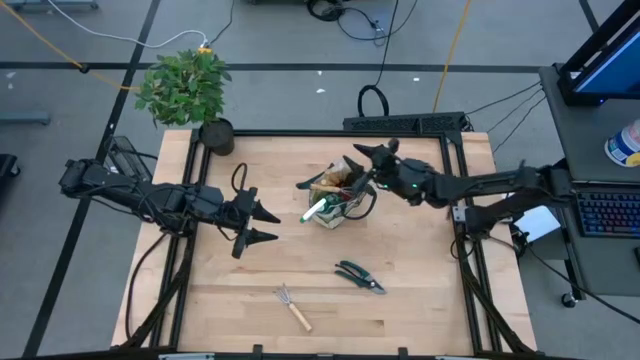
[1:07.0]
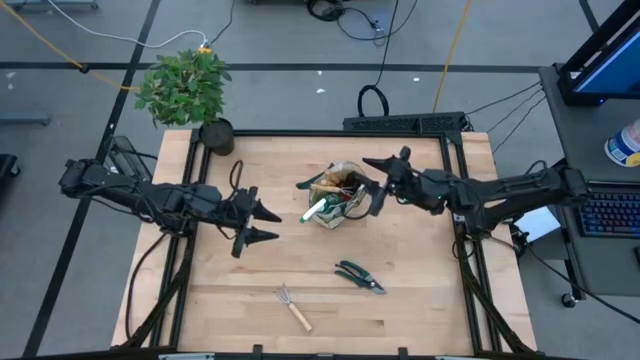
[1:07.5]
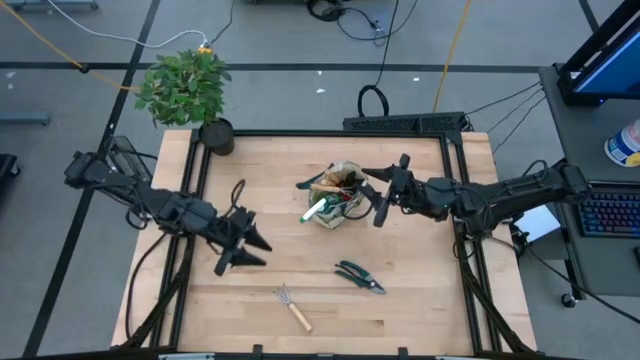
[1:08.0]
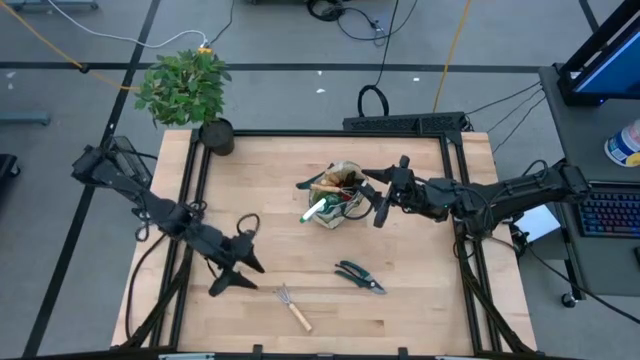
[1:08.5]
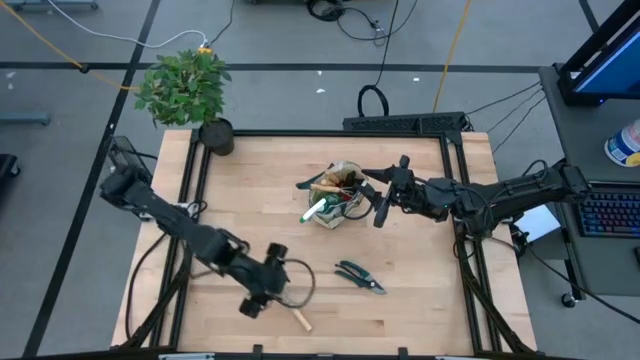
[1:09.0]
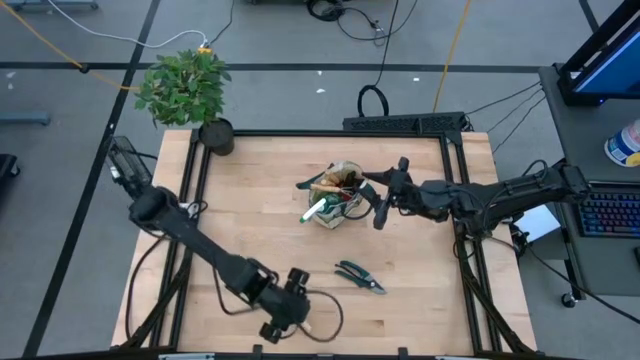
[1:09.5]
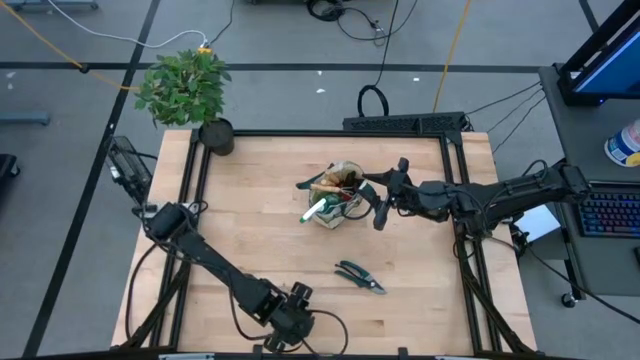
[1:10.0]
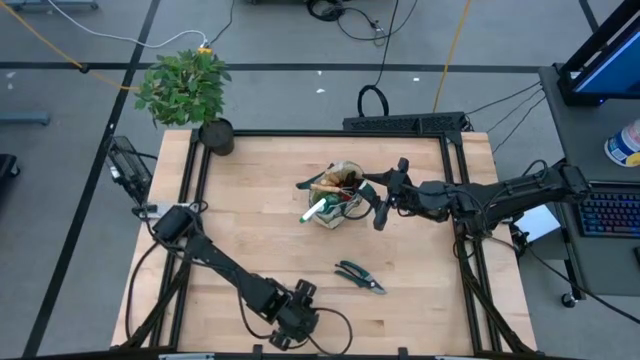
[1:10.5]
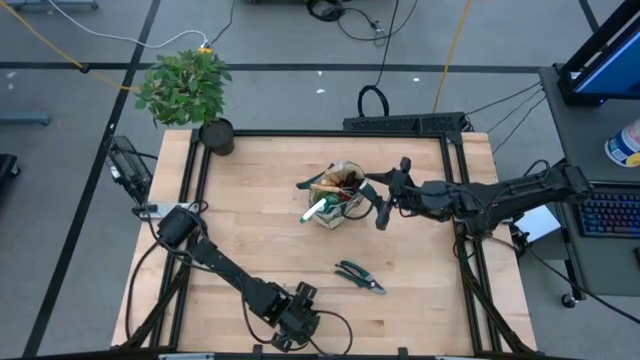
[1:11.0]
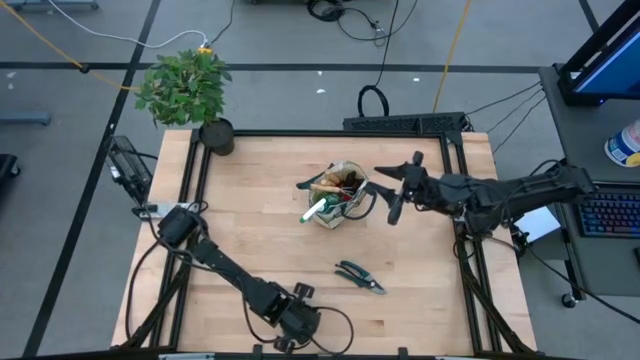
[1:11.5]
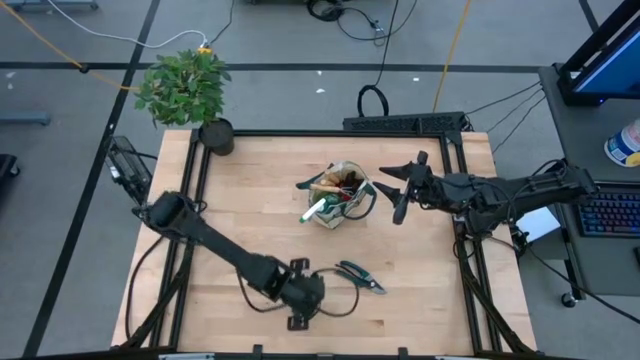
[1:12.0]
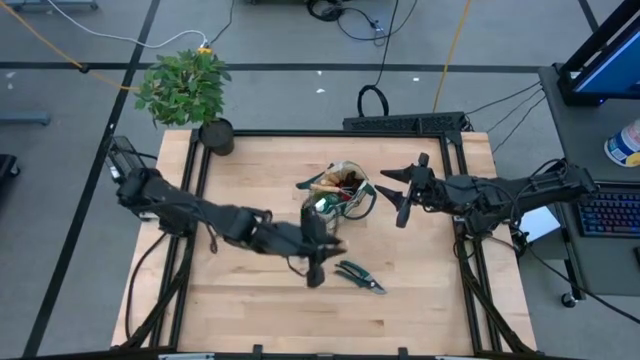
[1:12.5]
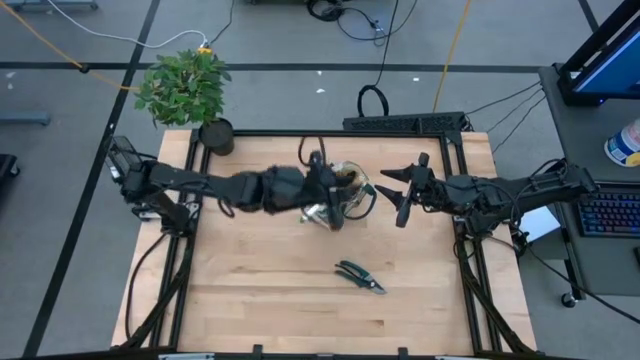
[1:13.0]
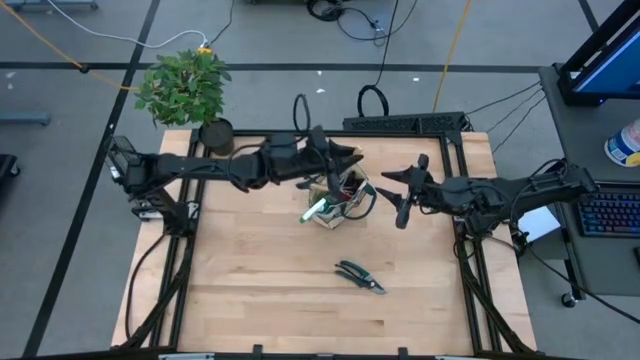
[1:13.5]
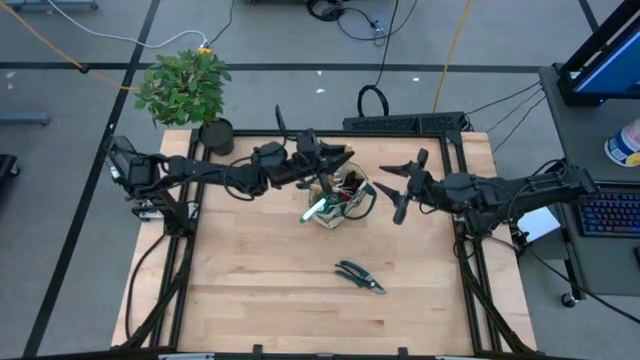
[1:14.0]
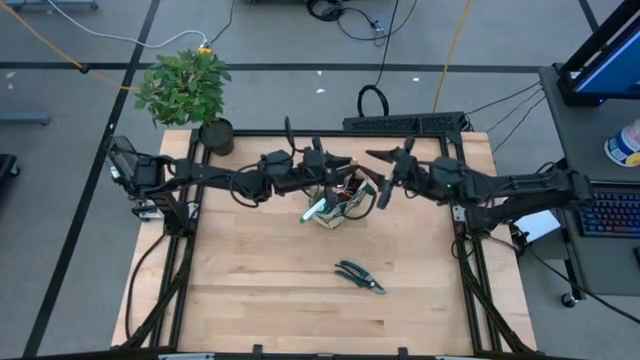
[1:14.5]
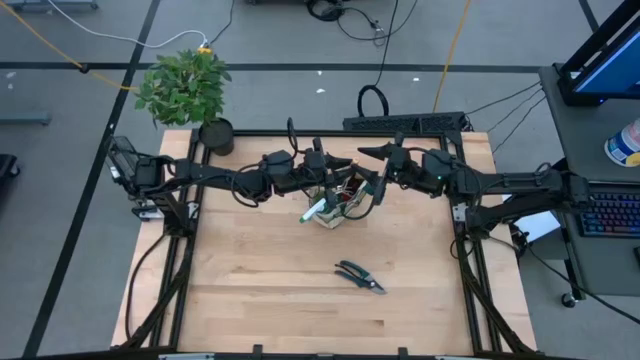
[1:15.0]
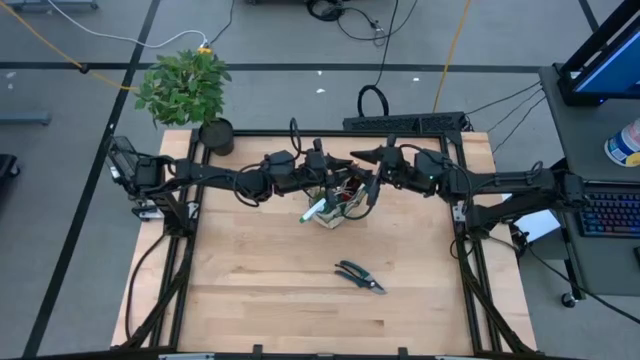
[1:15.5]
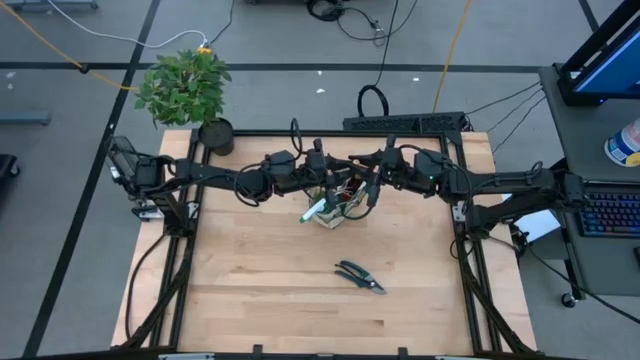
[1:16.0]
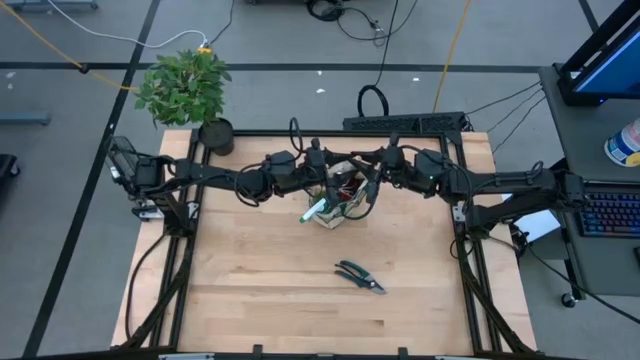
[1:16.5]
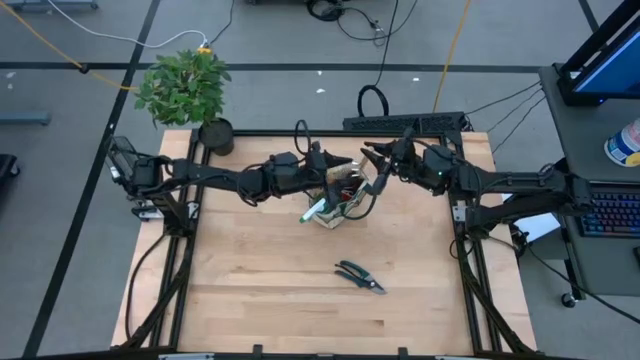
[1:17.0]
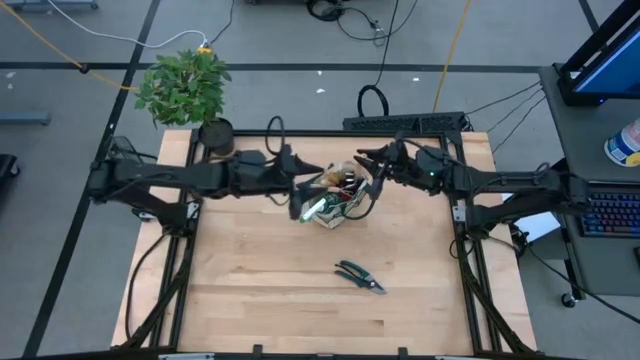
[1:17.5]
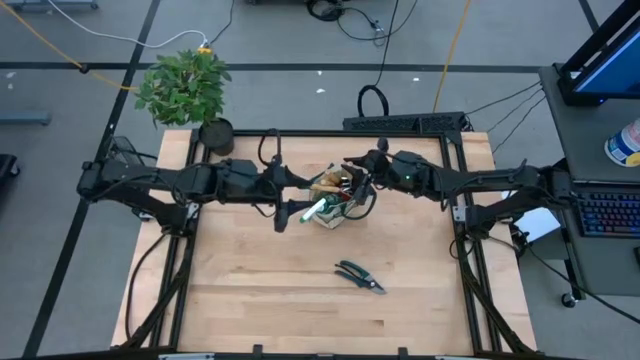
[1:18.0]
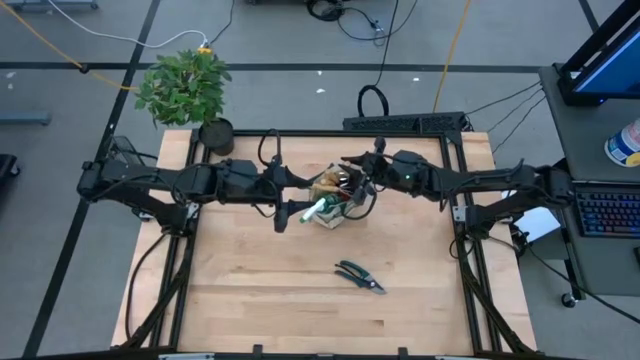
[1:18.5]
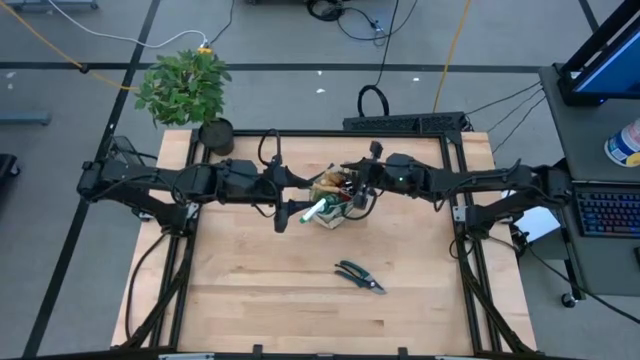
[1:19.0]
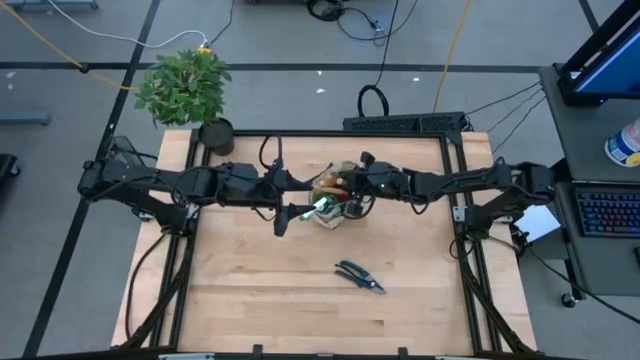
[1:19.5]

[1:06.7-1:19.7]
Task: Pick & Place Garden tools in Gardening bag
Put the light brown hand rake into the light brown gardening bag

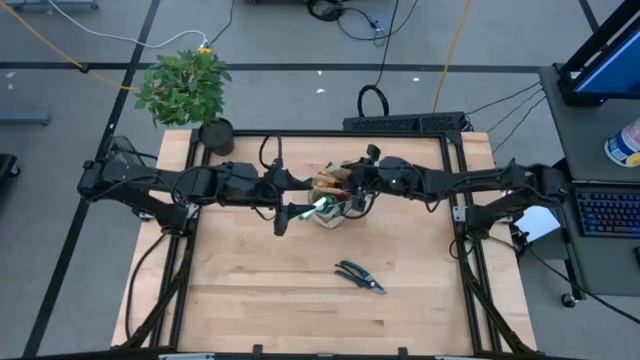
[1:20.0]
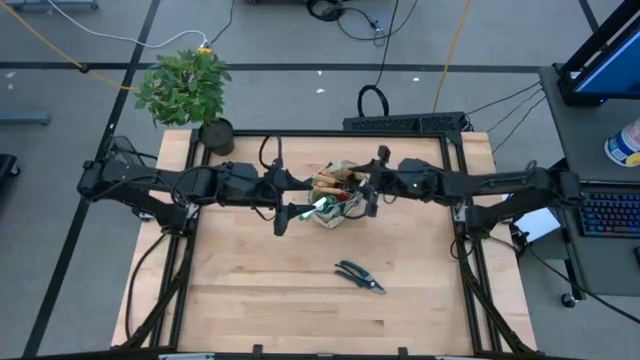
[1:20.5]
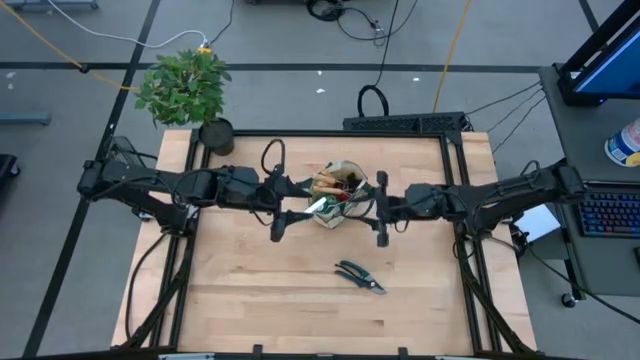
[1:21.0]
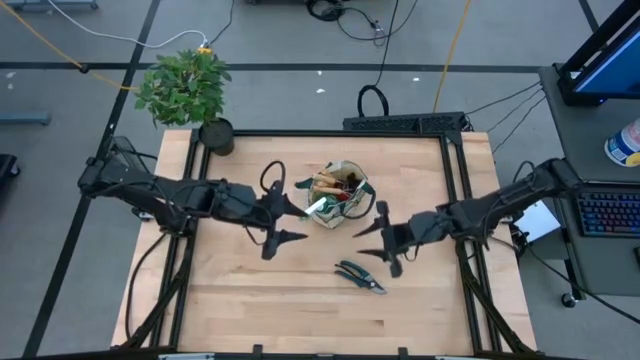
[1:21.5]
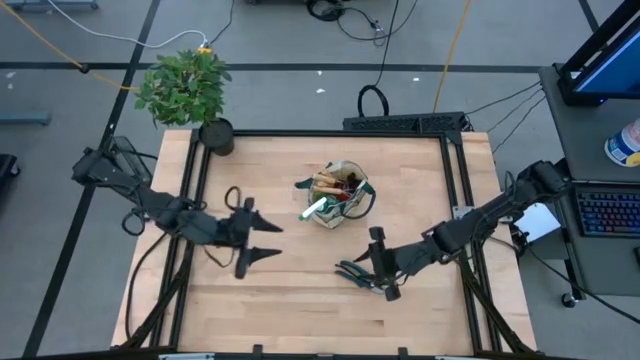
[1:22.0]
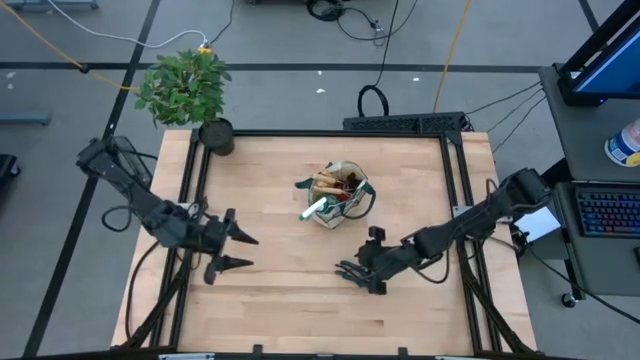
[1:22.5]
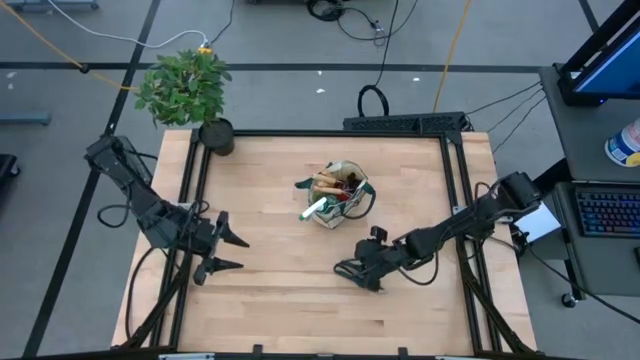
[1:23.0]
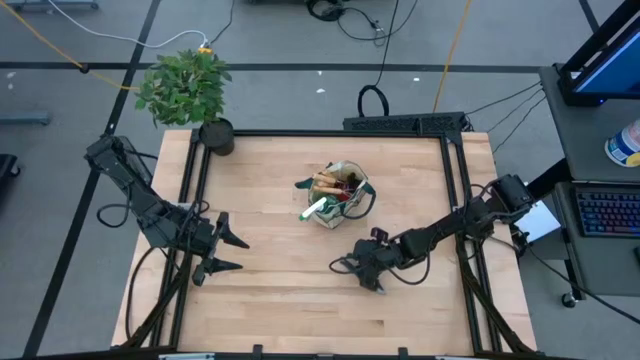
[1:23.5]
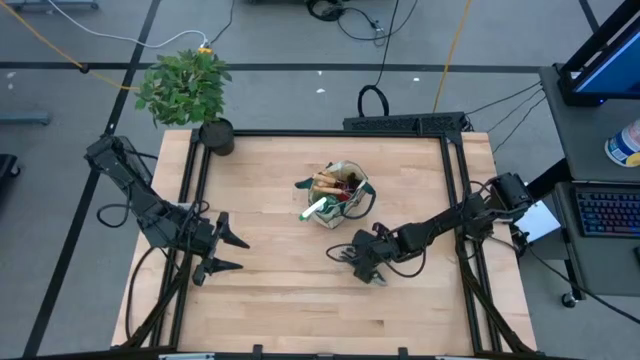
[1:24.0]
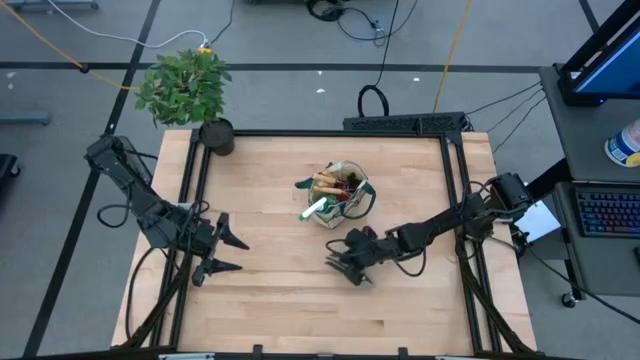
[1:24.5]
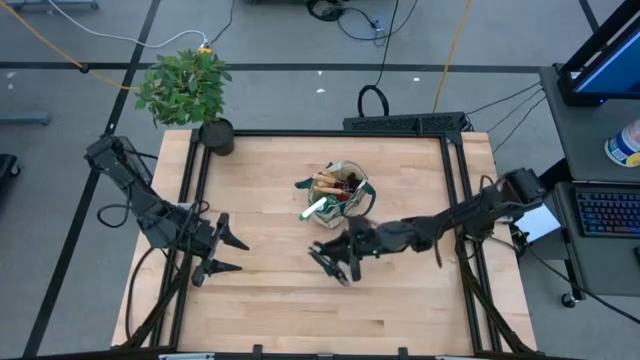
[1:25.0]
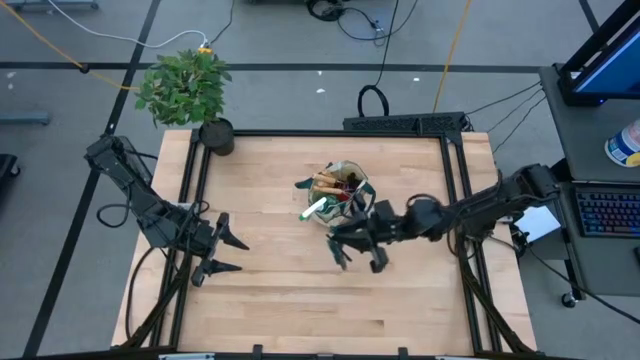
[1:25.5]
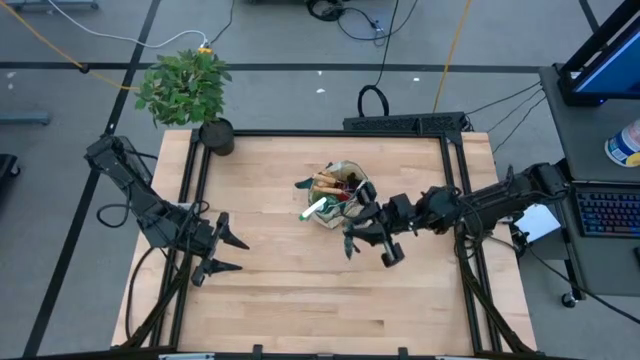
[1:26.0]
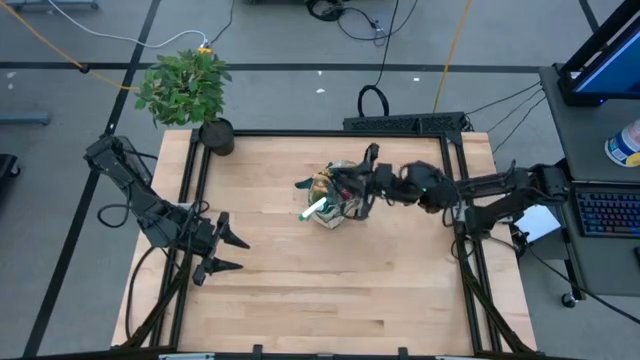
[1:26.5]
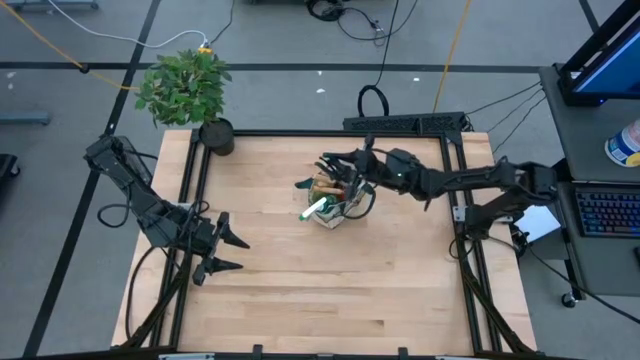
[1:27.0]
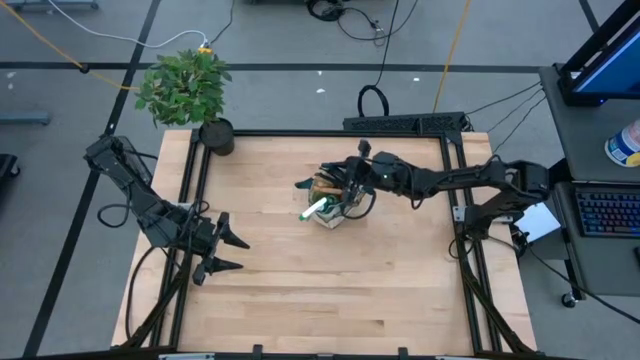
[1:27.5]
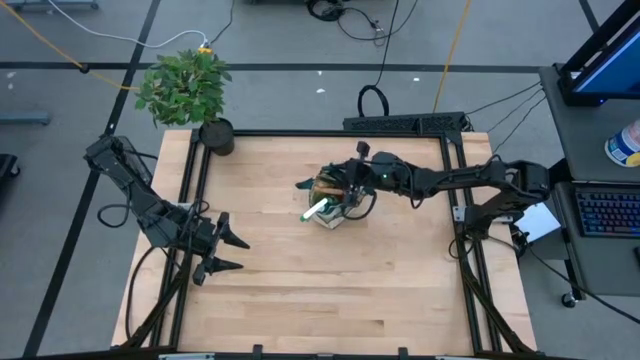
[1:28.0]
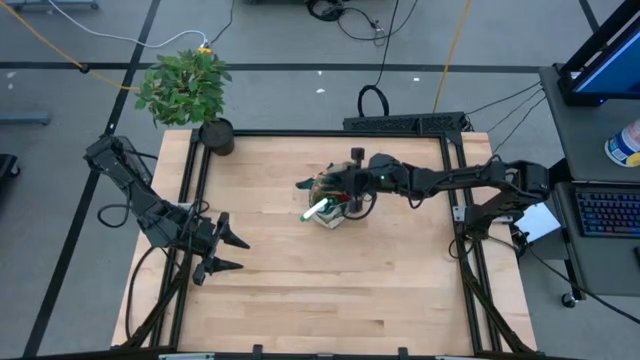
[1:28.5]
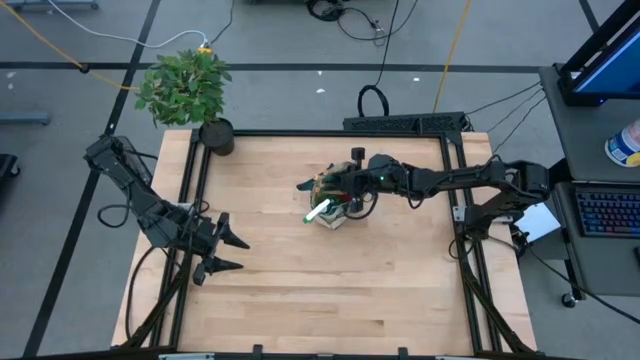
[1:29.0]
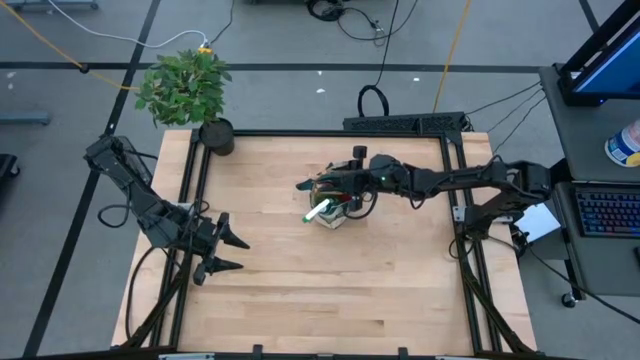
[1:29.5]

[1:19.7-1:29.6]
Put the red shear scissors into the light brown gardening bag
